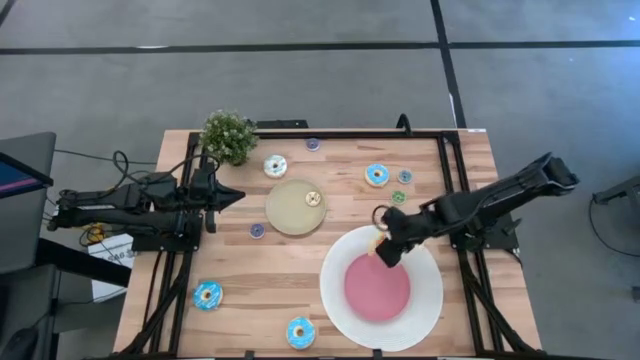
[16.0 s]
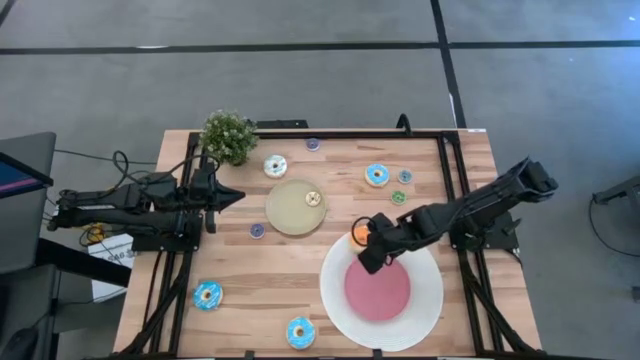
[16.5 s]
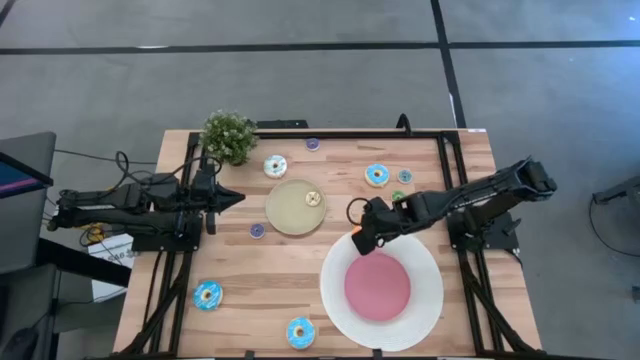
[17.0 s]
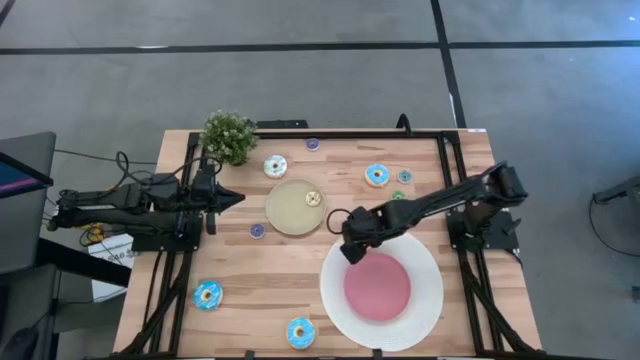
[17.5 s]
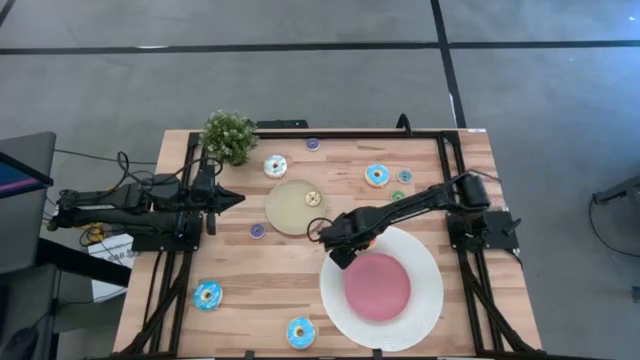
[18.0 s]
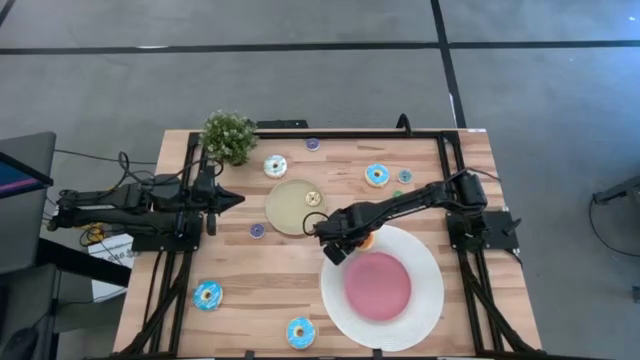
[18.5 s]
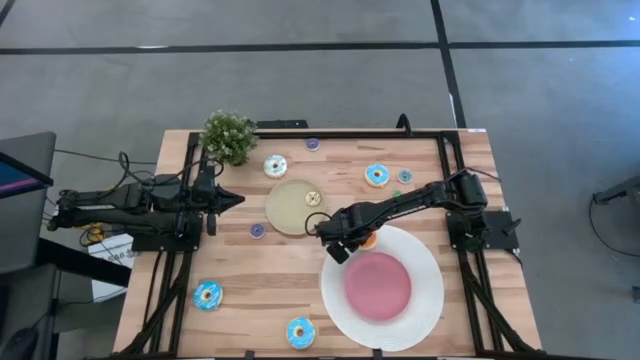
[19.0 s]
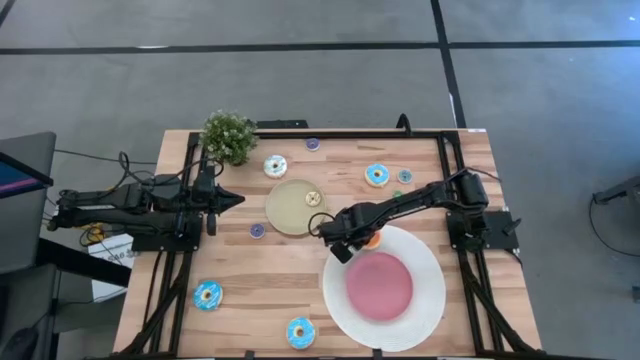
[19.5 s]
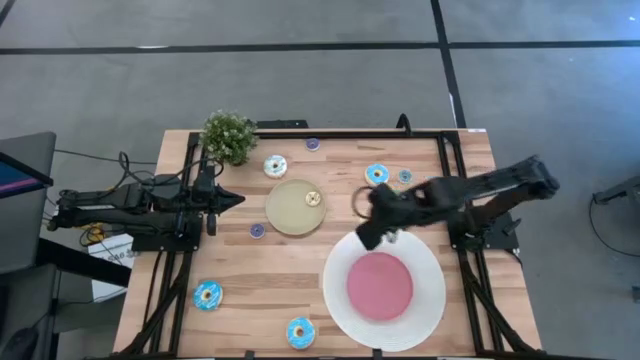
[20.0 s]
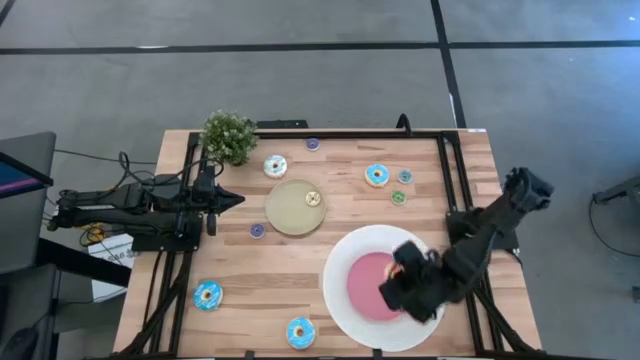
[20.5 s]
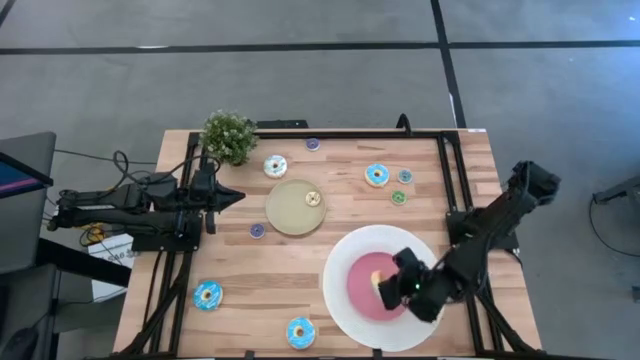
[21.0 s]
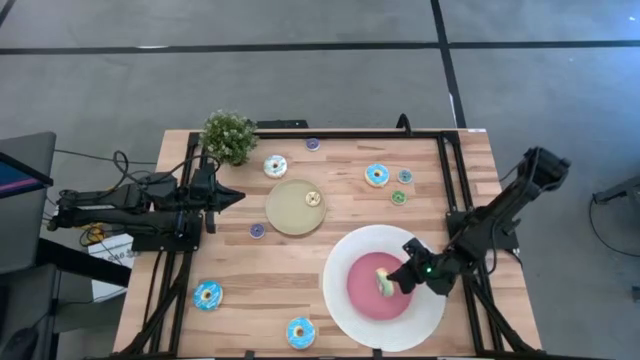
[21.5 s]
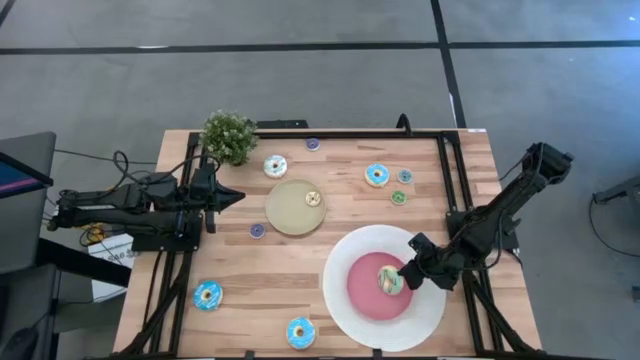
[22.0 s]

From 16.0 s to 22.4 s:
Task: Pick & Place donuts
Put the large light green donut on the pink plate

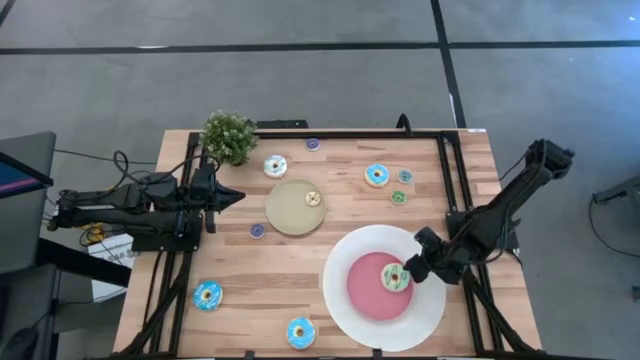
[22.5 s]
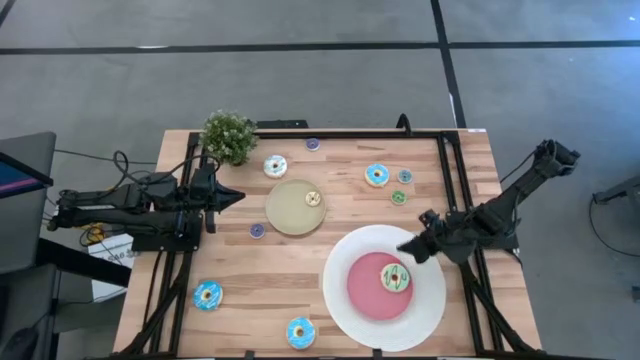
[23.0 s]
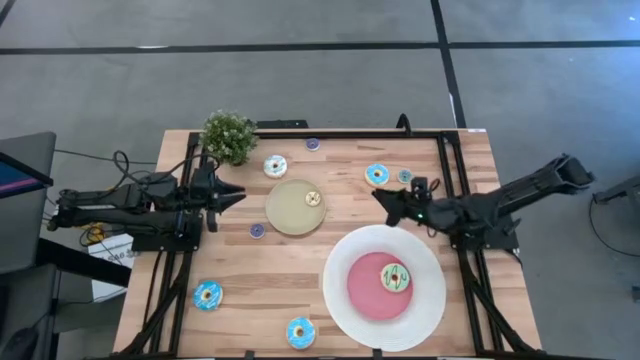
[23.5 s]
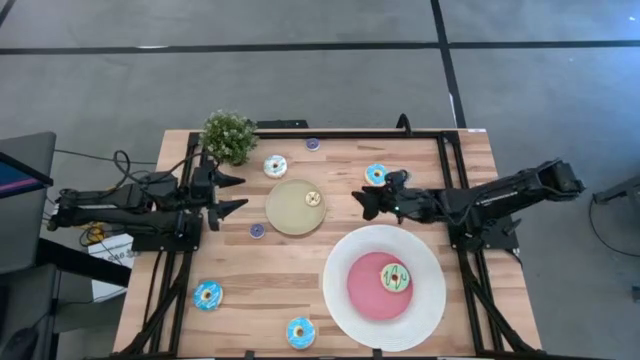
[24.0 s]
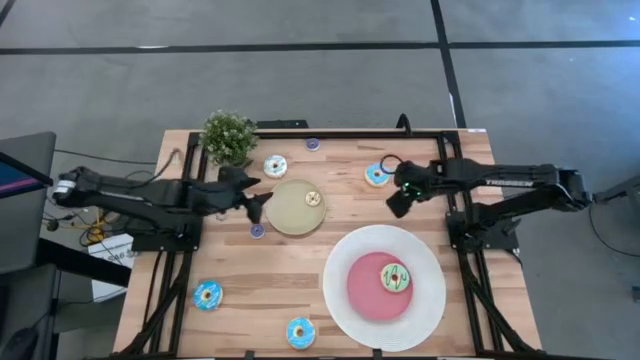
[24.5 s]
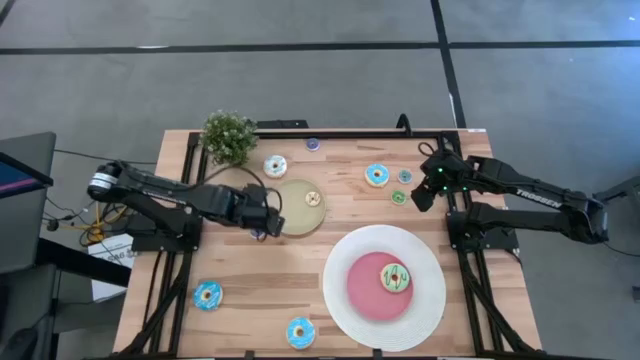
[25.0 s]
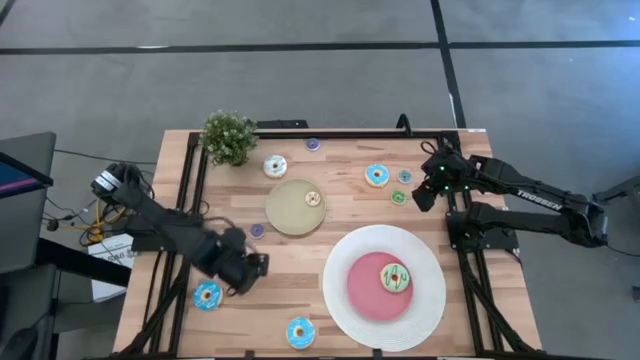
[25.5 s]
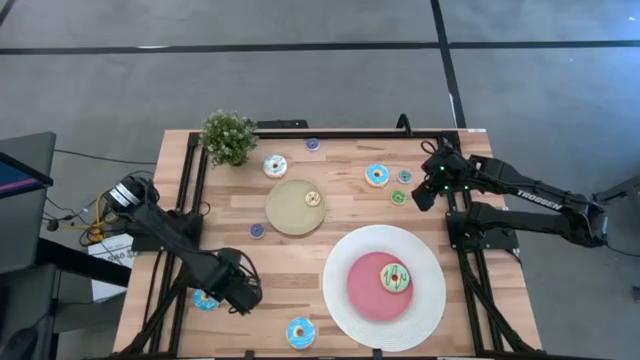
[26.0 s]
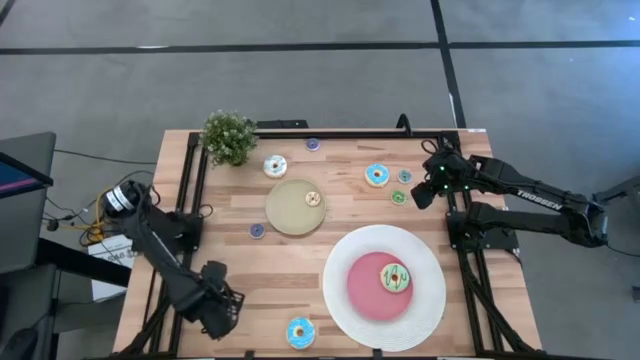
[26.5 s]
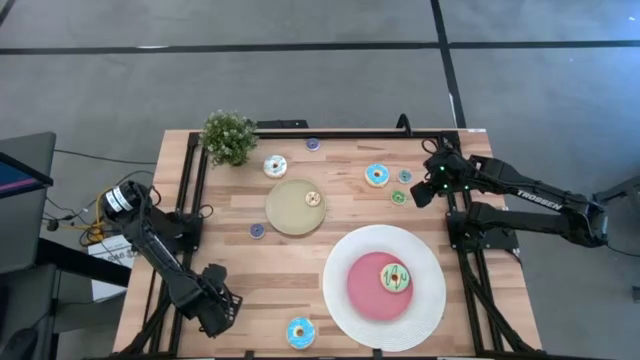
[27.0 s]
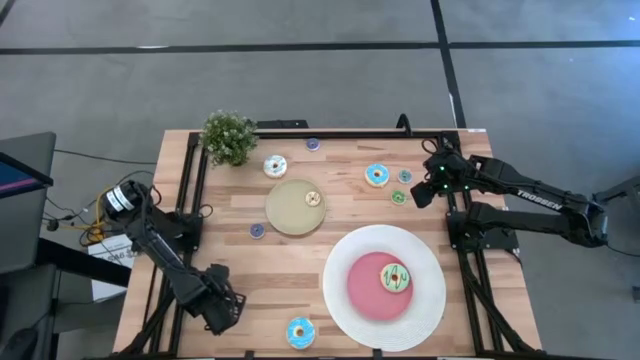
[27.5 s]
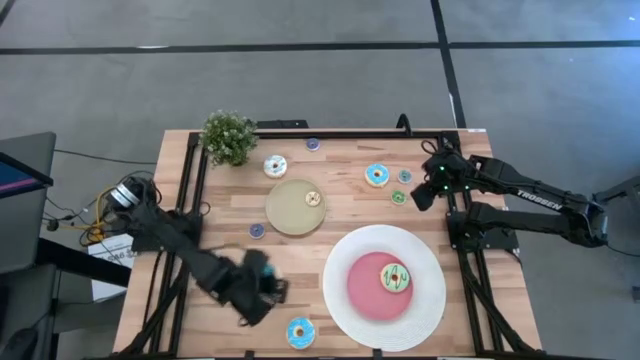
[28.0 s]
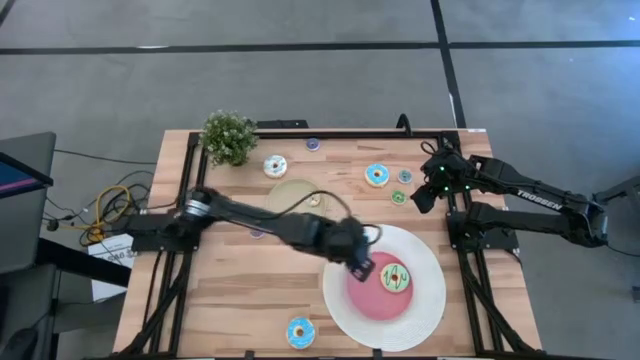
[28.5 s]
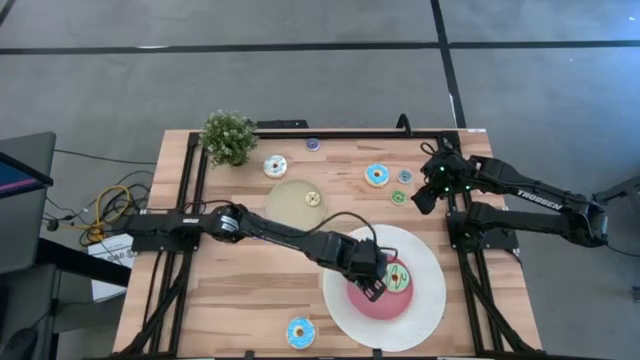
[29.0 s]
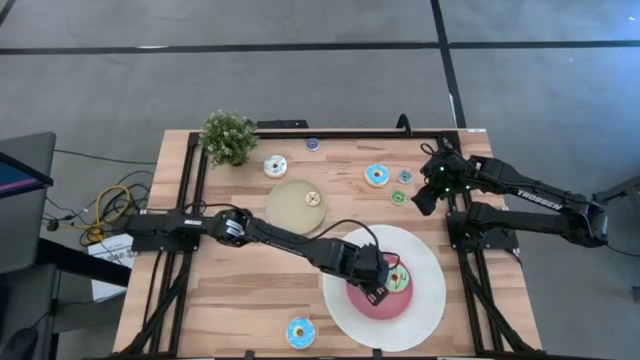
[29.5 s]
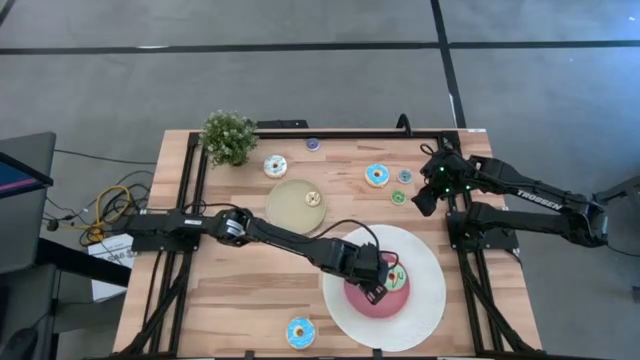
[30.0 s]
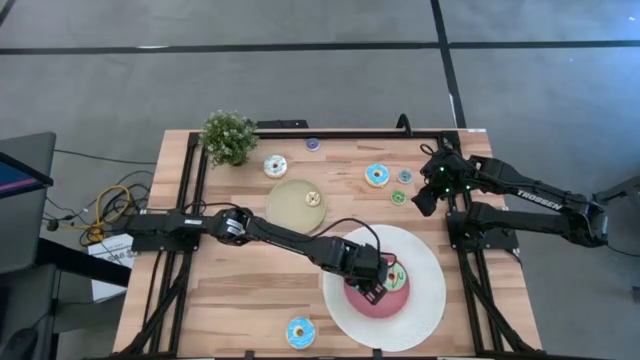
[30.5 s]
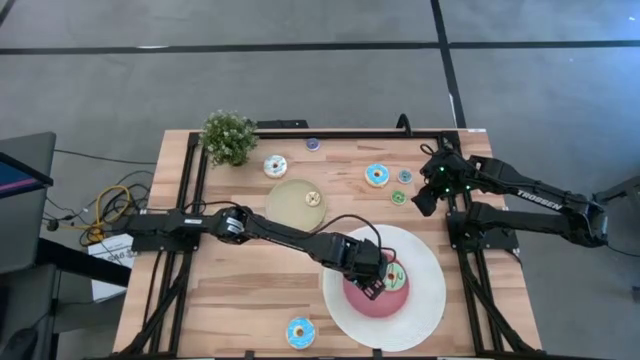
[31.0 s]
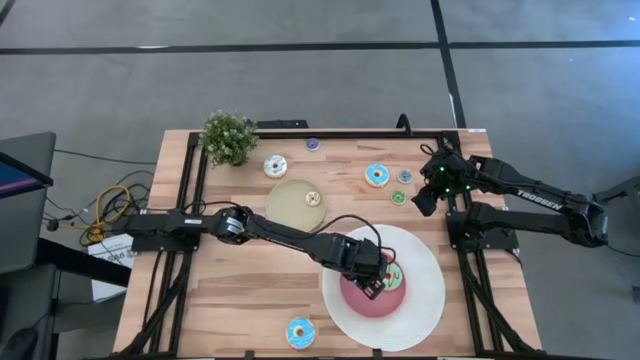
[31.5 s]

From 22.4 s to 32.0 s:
Put the left large blue donut on the pink plate

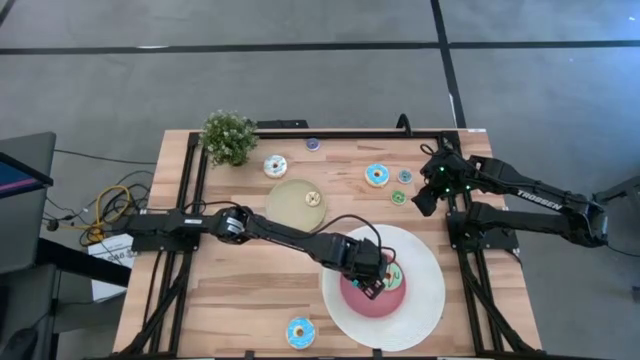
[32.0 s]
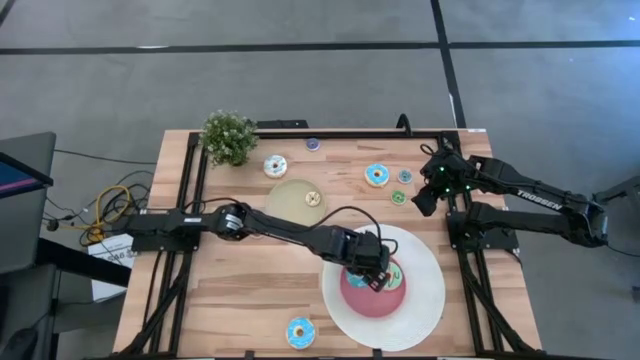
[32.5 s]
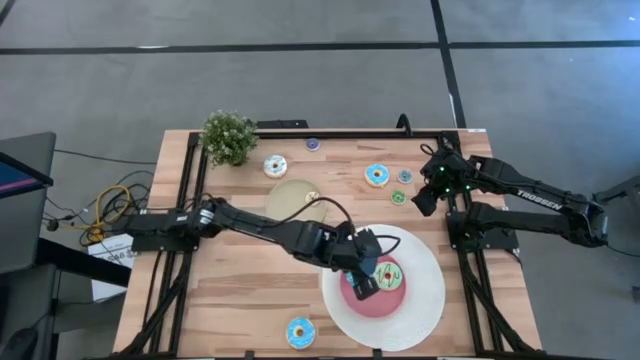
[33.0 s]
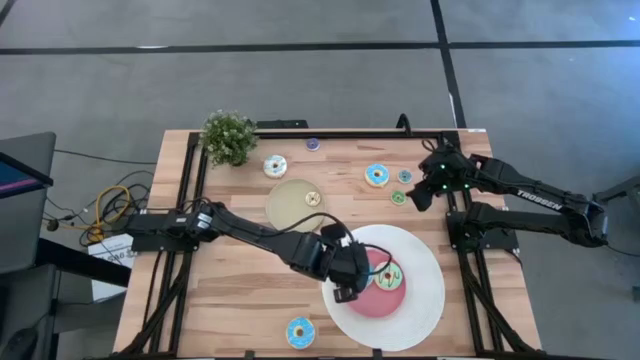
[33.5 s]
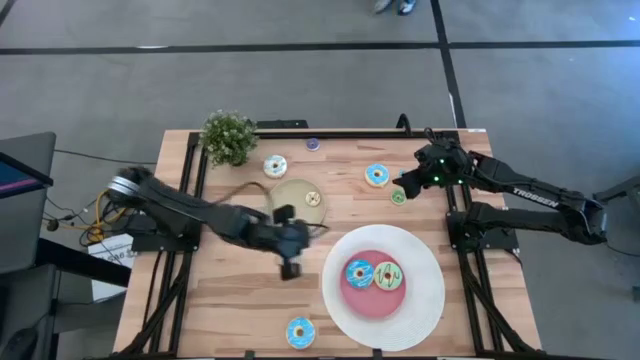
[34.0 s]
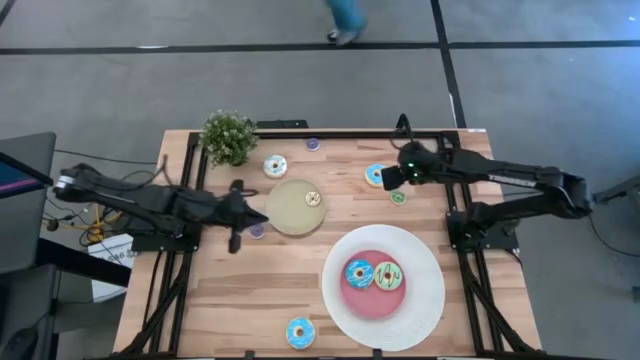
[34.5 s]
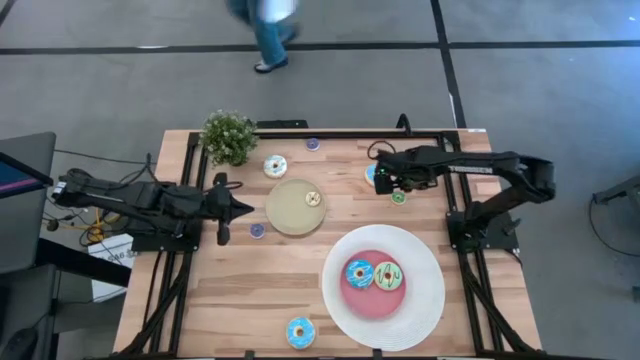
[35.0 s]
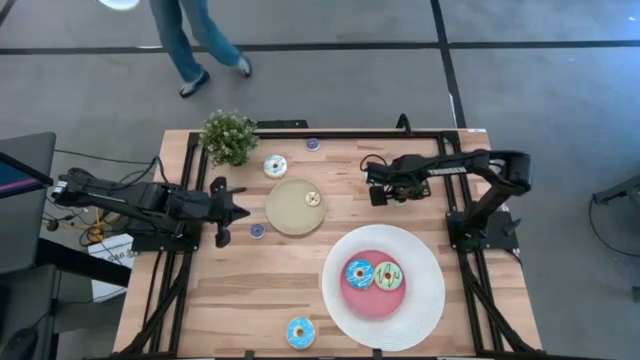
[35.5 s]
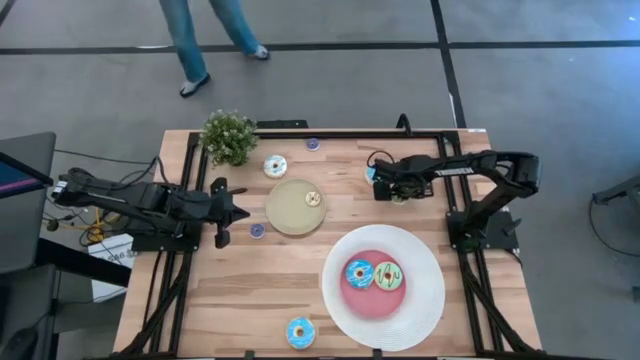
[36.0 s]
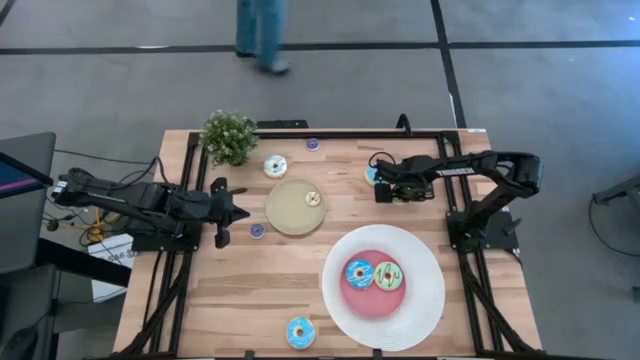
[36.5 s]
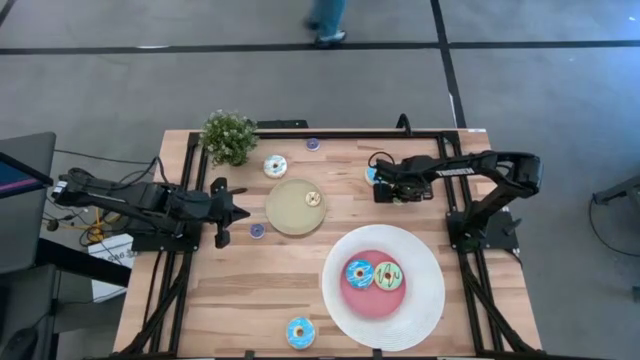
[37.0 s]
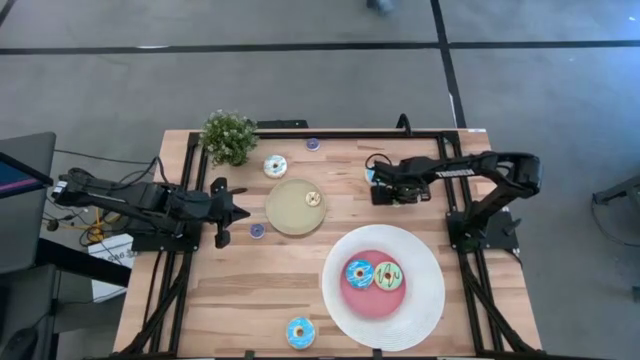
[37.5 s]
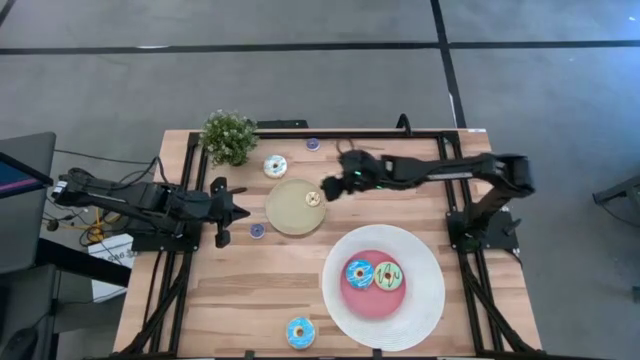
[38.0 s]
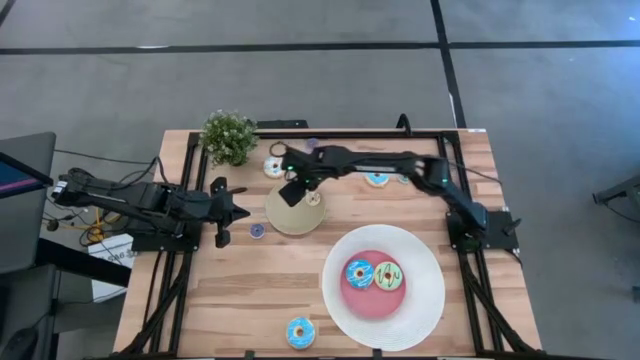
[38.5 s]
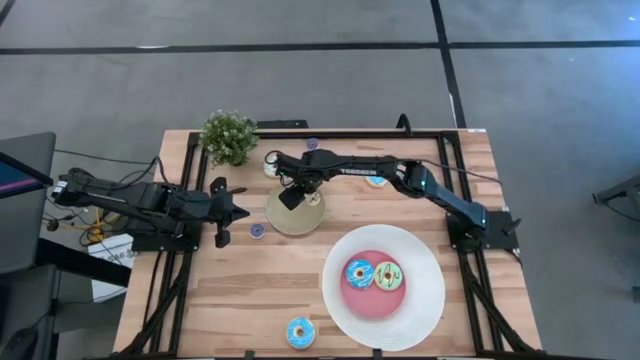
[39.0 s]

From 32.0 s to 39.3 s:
Put the small green donut on the brown plate
